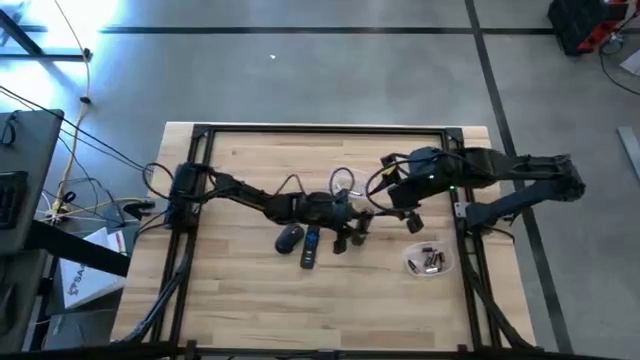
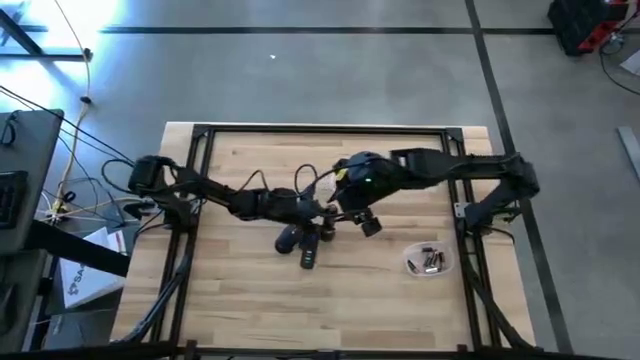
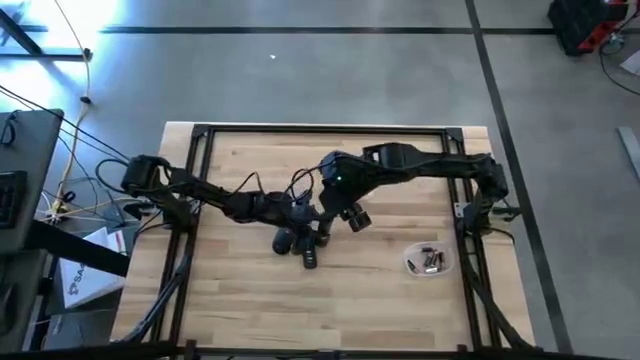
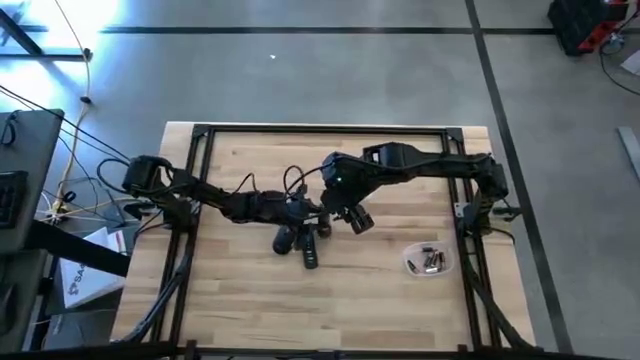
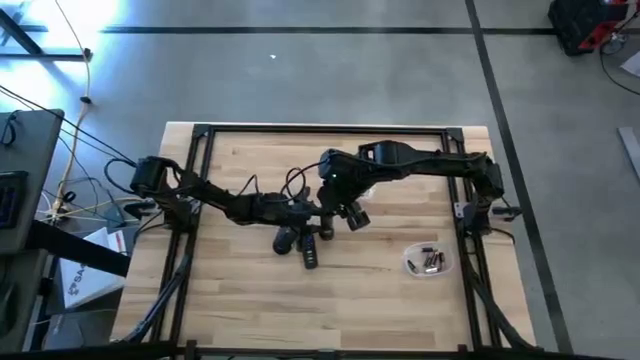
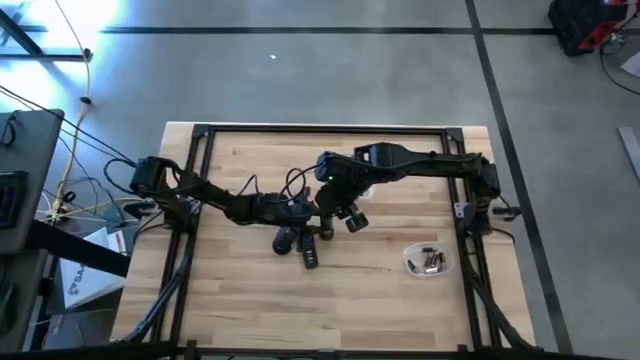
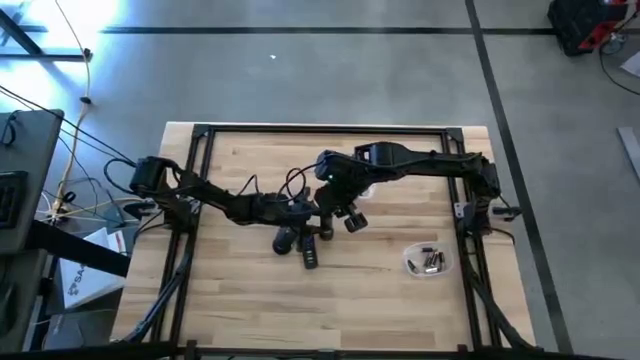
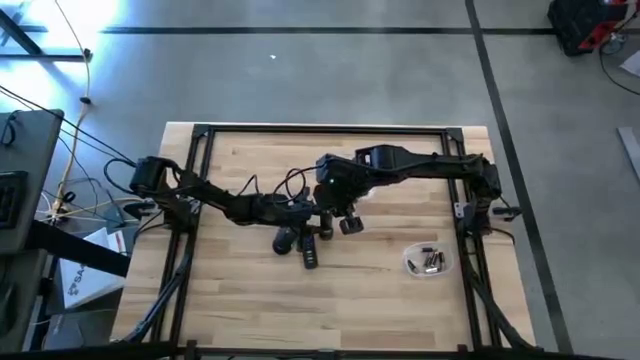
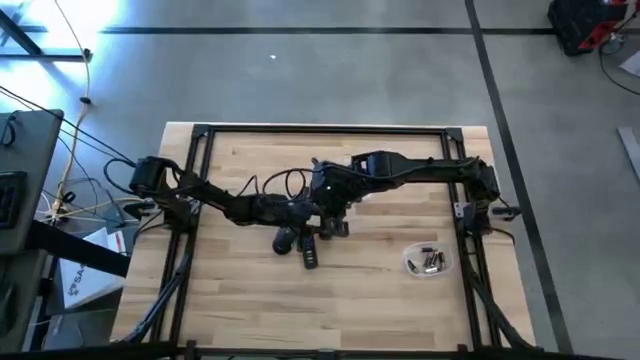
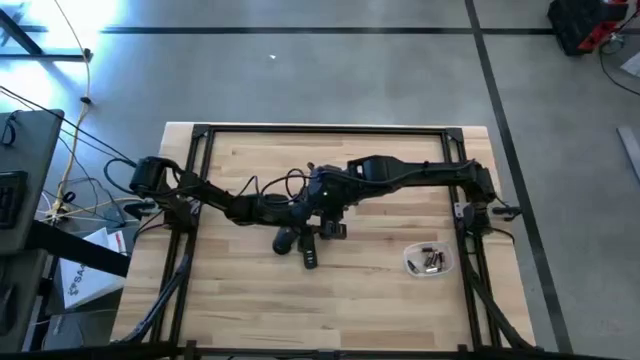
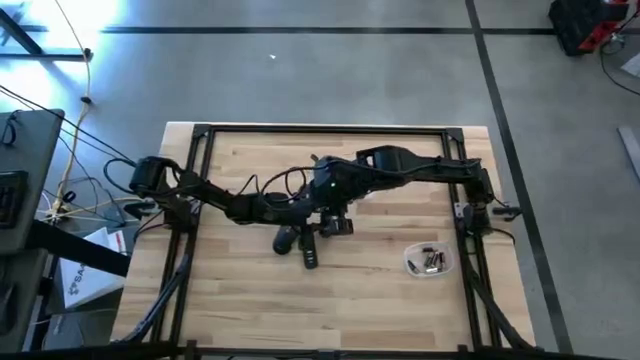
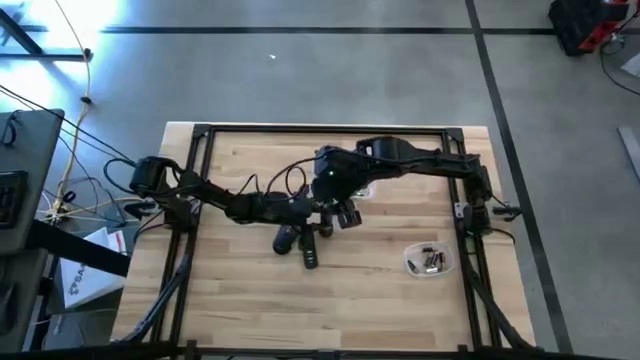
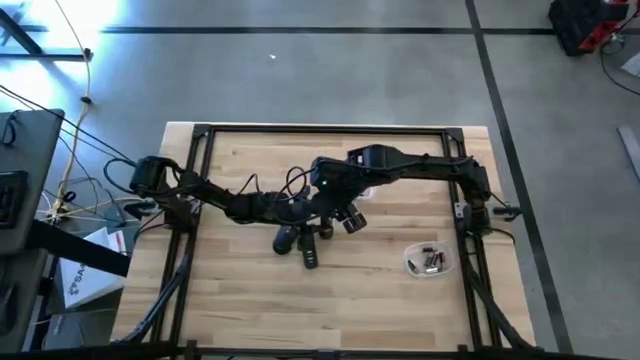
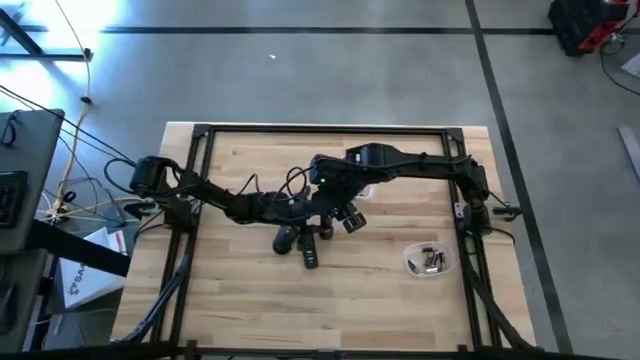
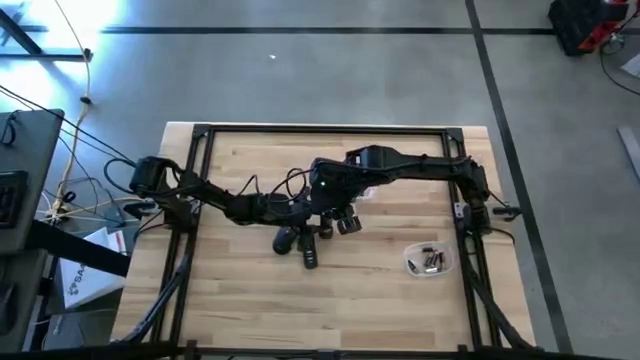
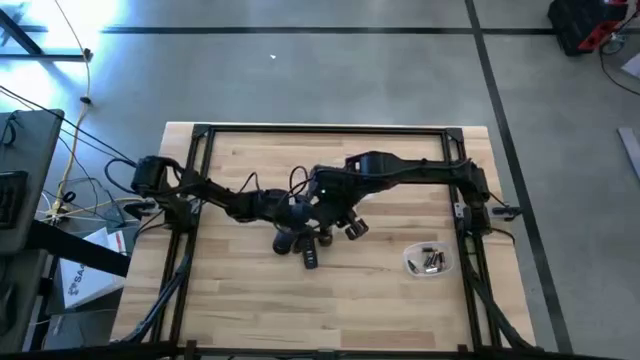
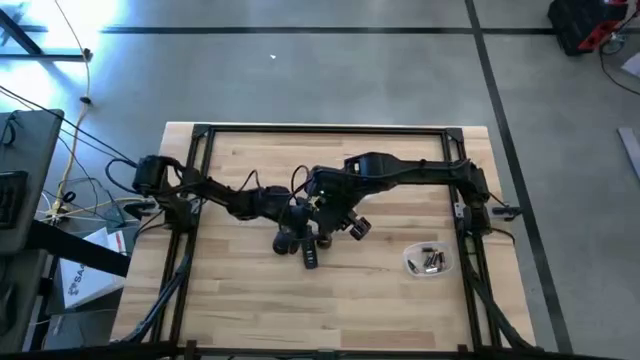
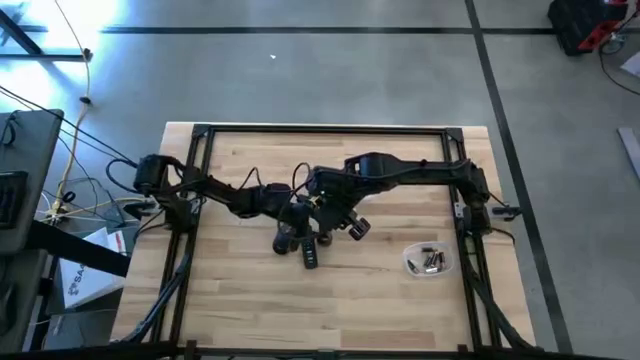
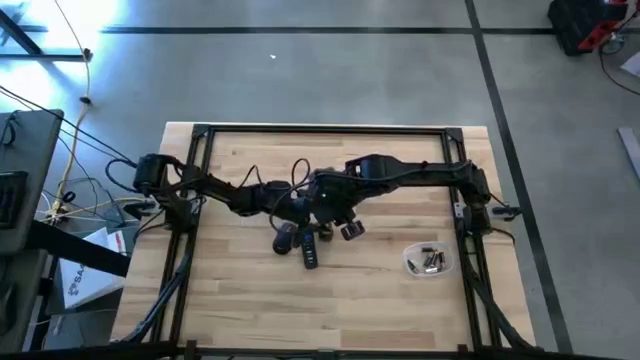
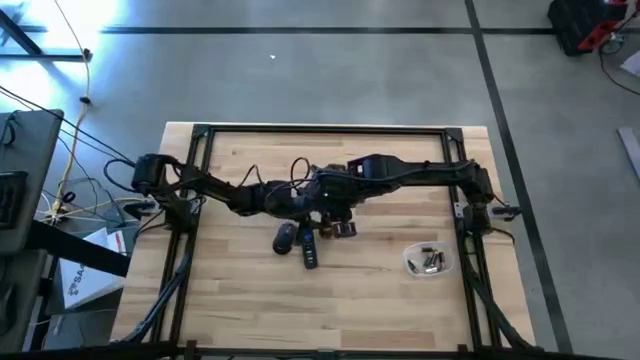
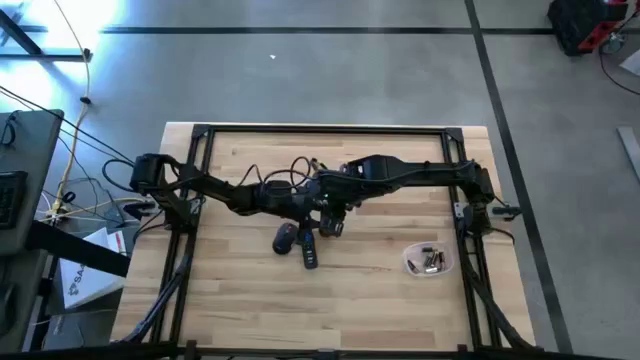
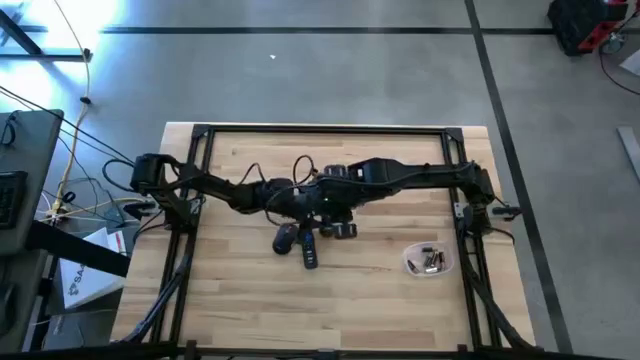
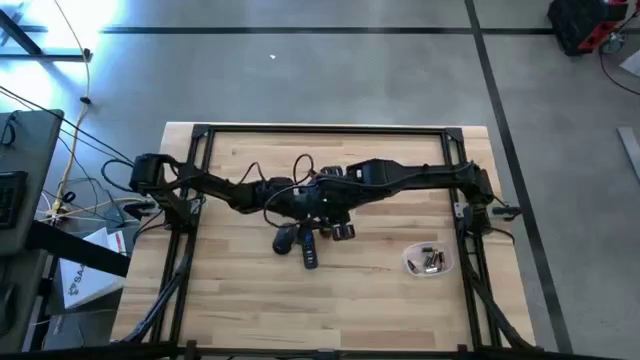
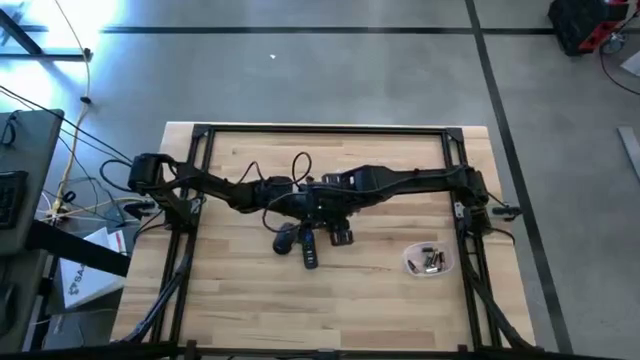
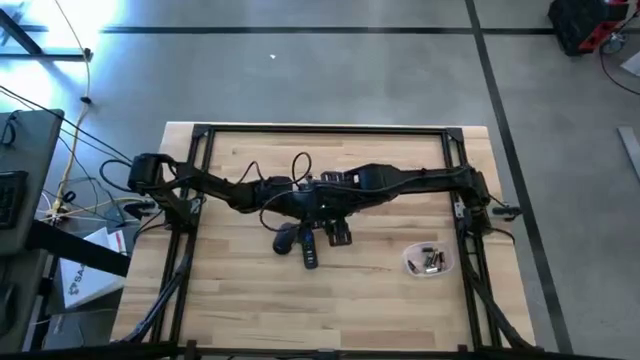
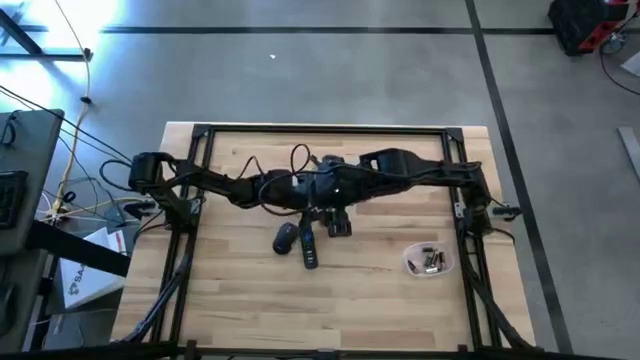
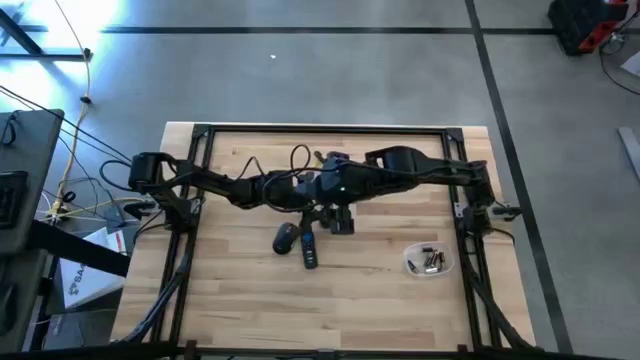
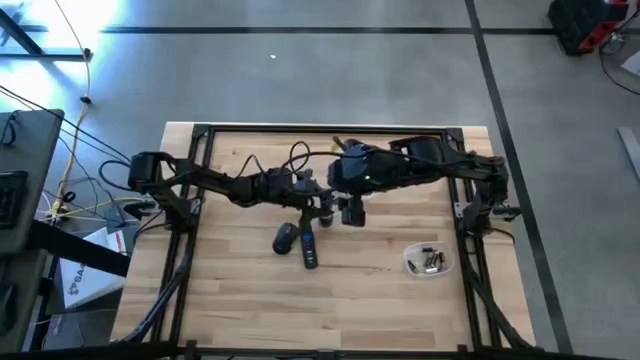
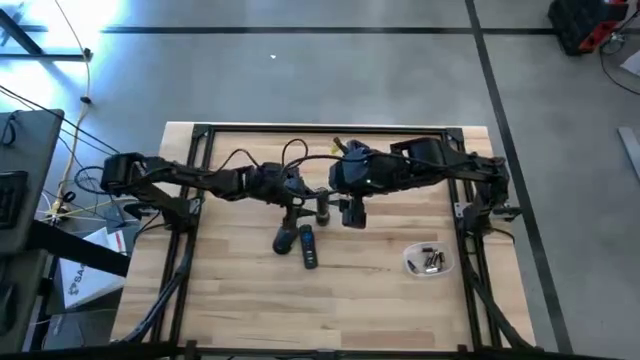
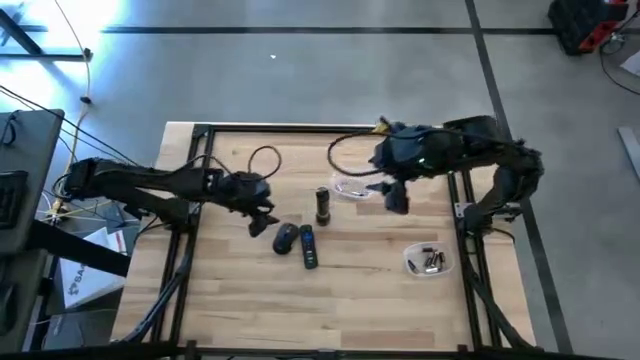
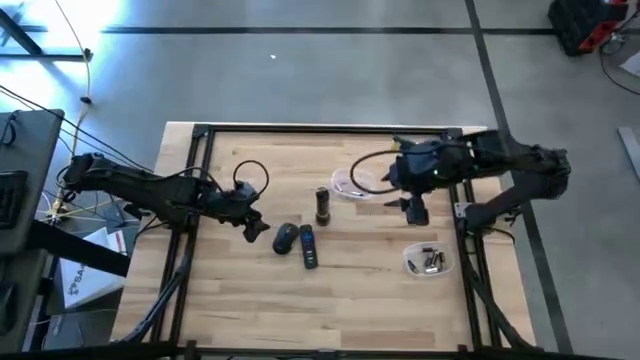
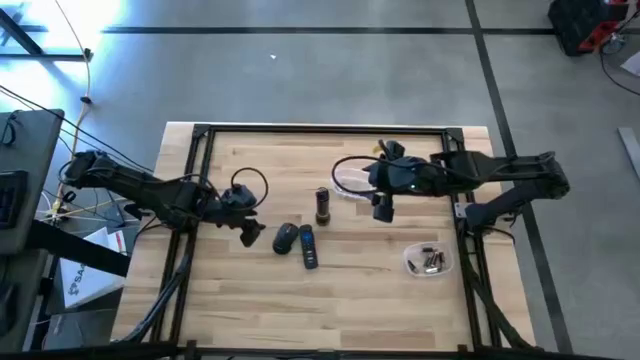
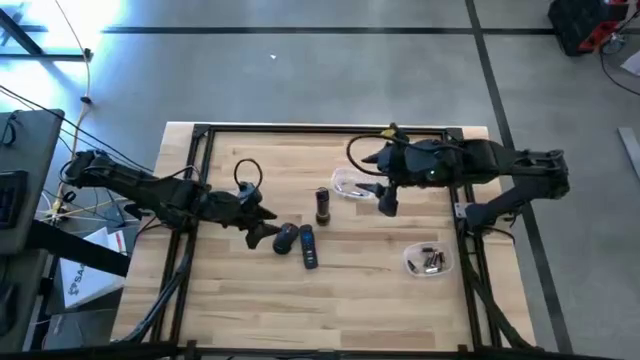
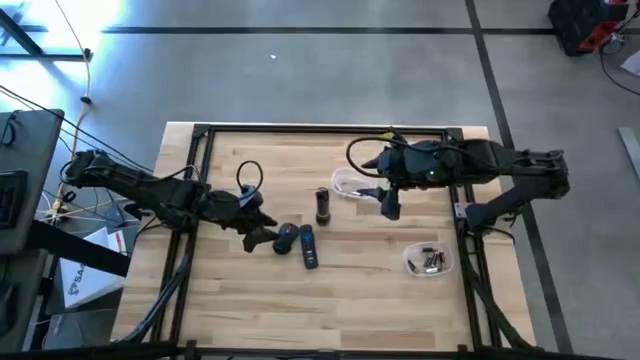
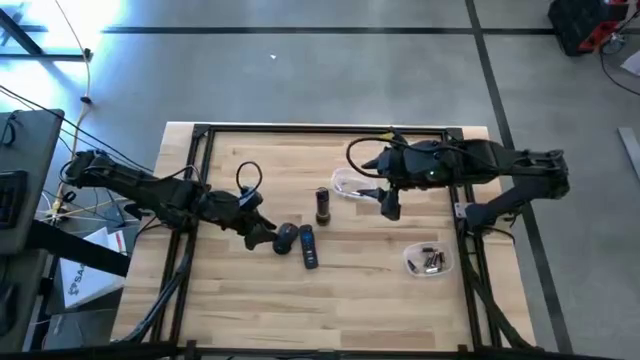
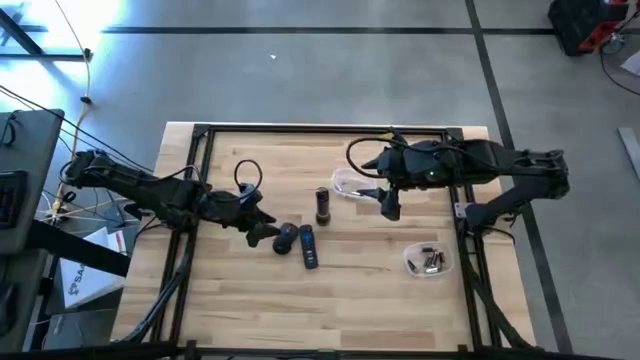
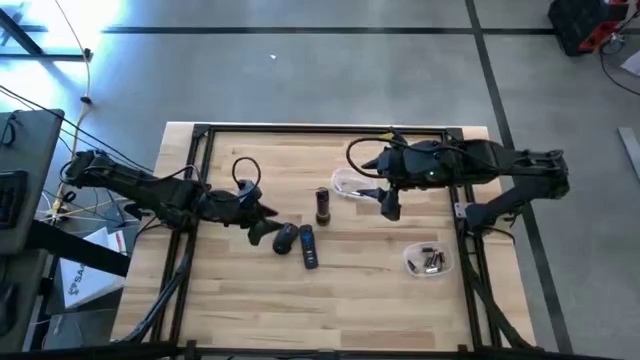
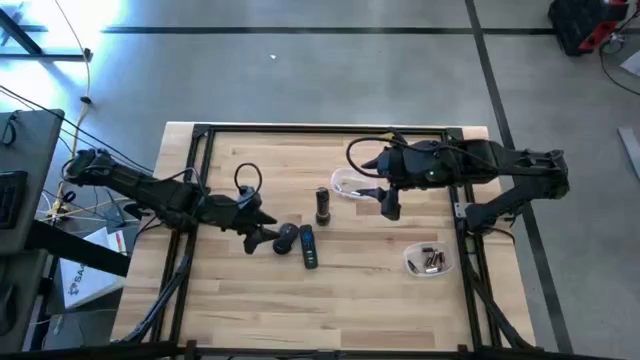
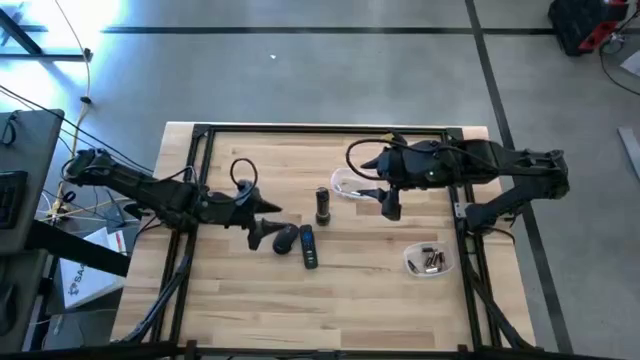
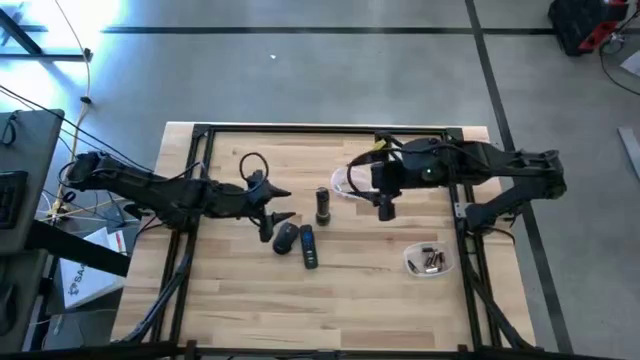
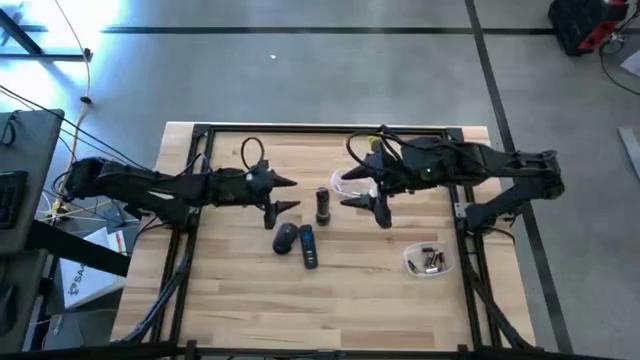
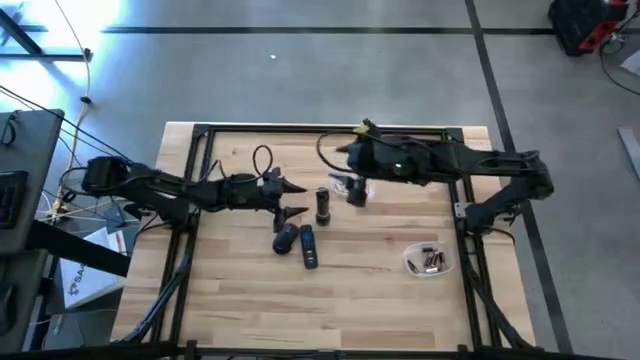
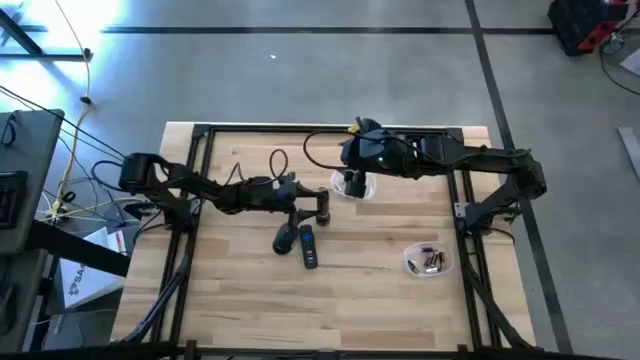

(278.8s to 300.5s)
Task: Insert battery
Close the flashlight battery compartment
